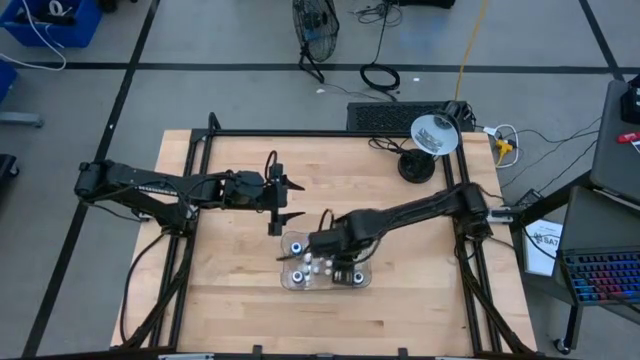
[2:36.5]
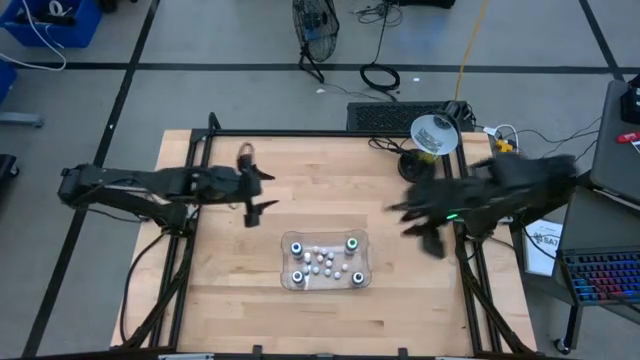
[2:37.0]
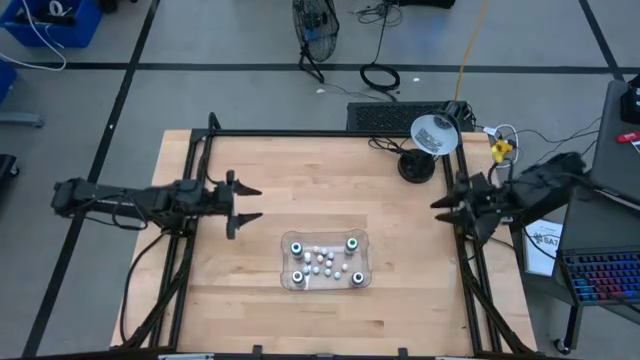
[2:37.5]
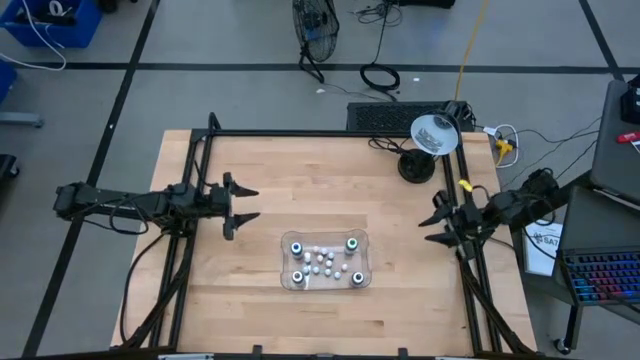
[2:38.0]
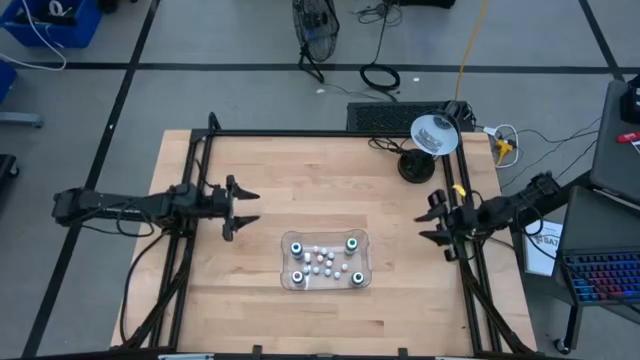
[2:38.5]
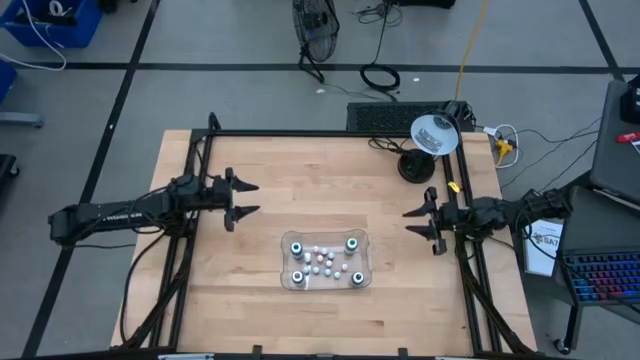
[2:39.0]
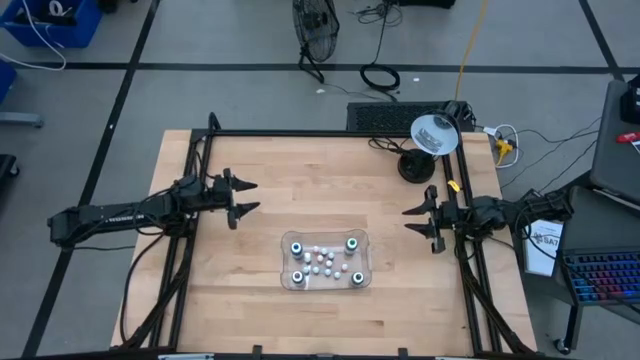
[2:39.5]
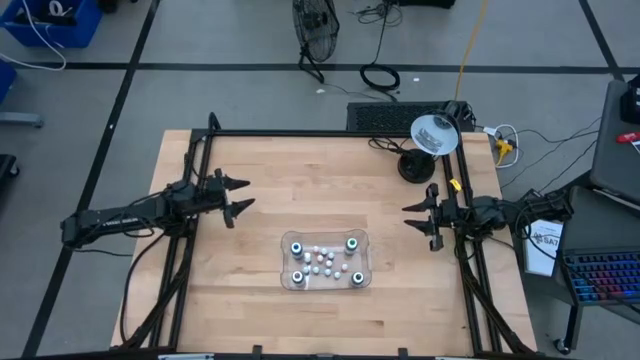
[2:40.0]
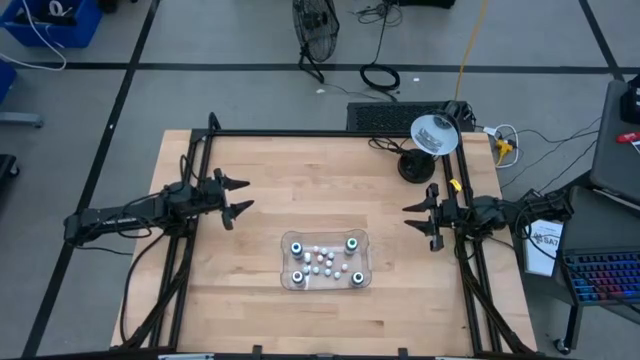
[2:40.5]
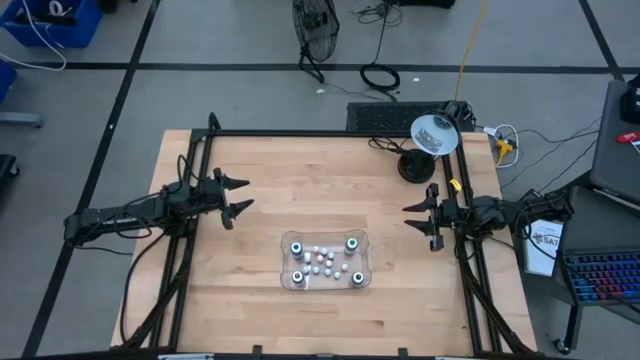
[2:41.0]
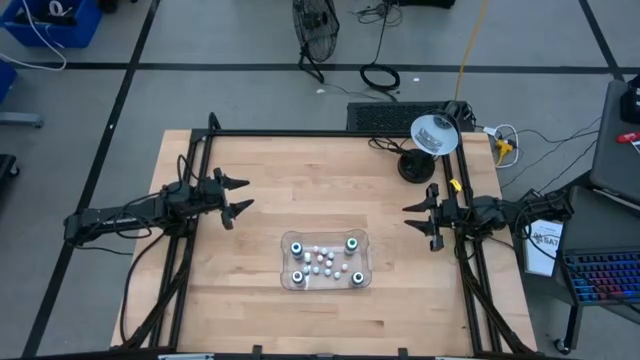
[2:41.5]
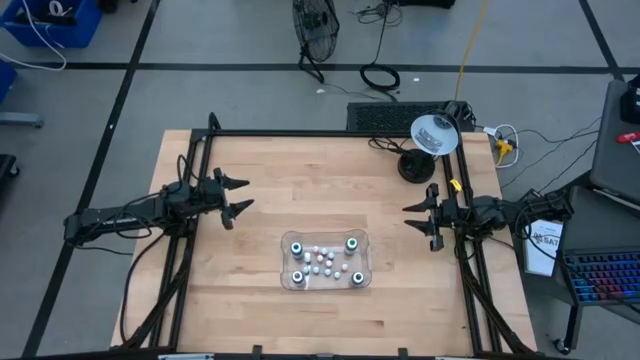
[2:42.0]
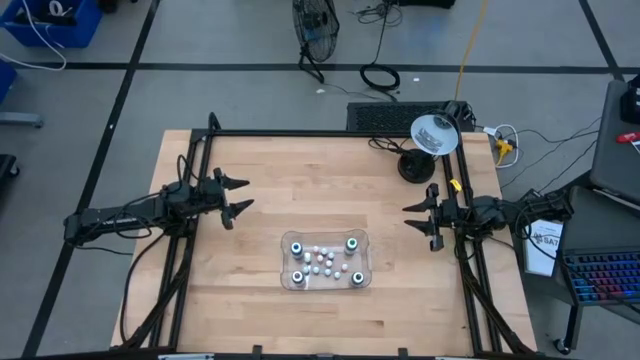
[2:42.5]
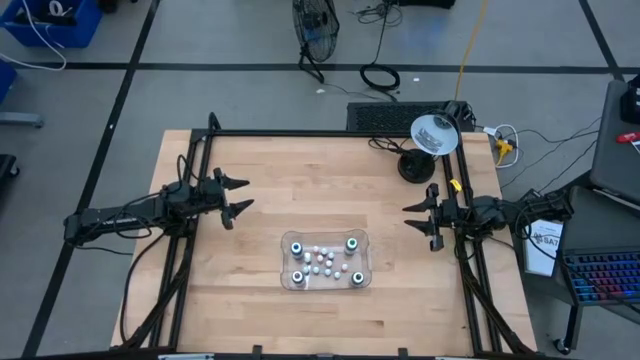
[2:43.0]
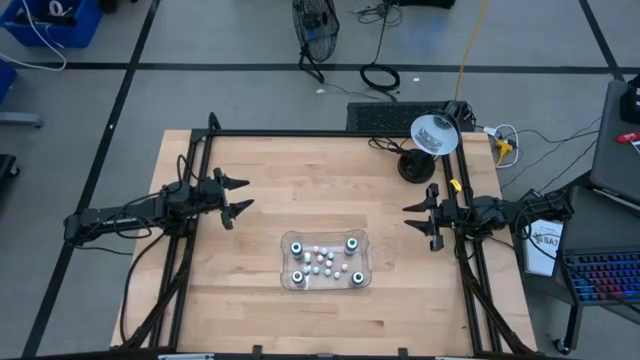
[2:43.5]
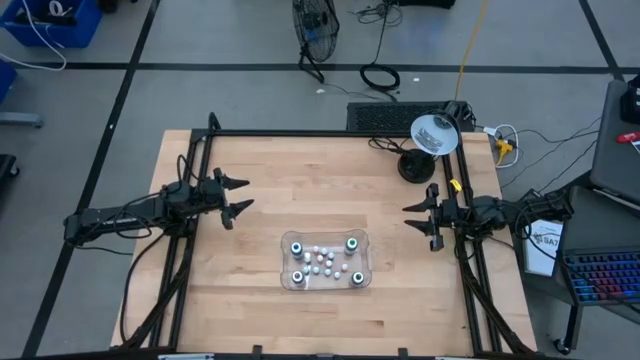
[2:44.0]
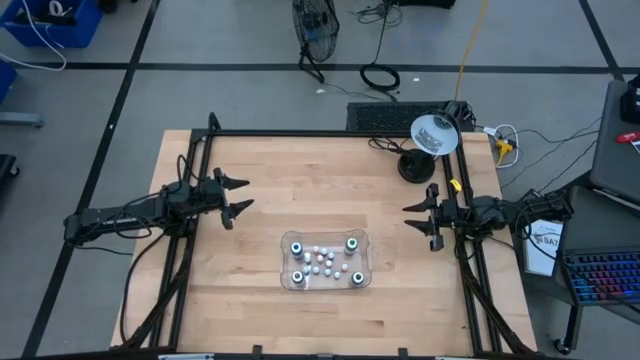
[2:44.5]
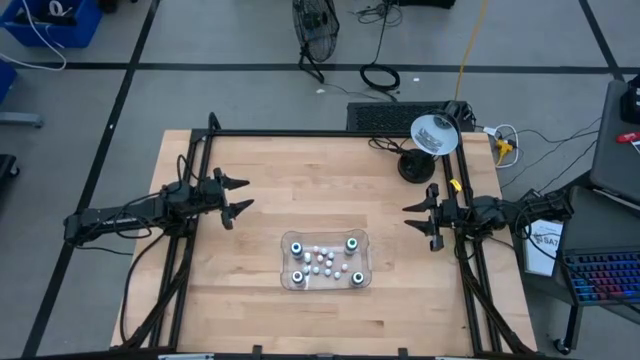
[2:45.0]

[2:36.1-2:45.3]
Task: Pick & Place food coloring
Return to home position

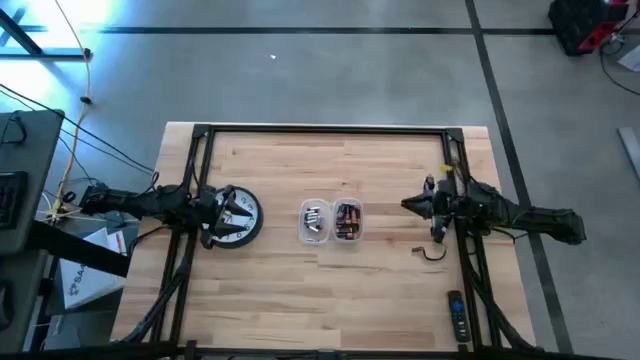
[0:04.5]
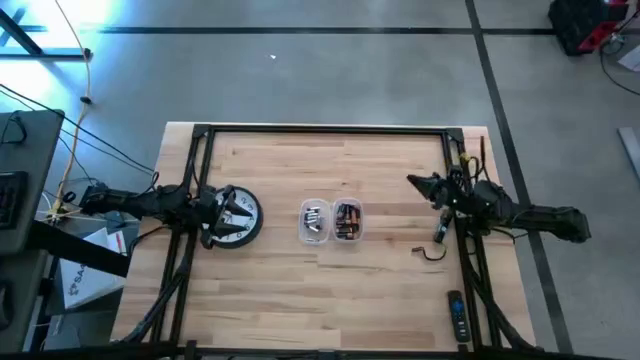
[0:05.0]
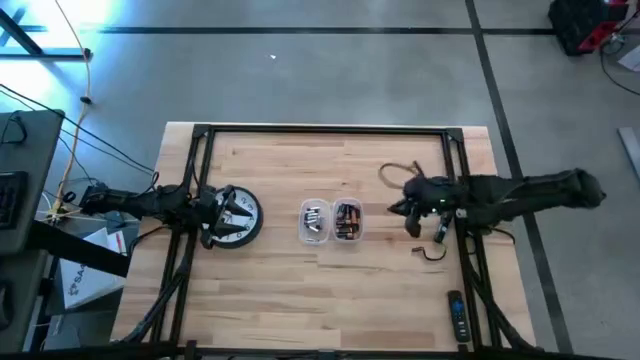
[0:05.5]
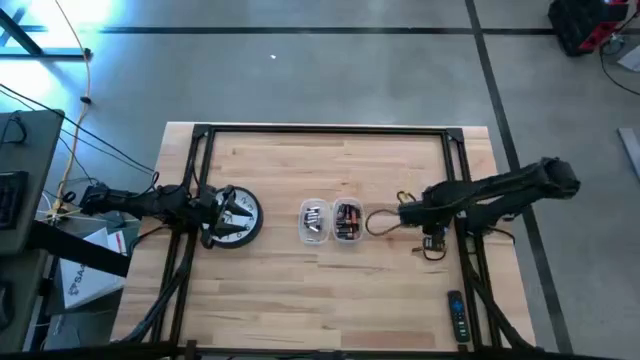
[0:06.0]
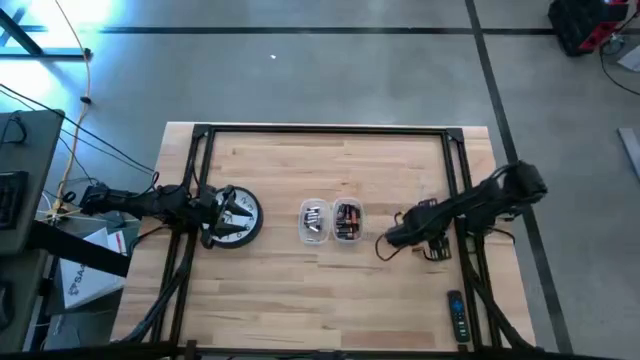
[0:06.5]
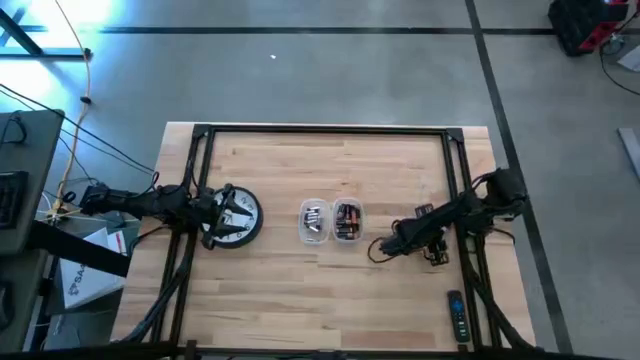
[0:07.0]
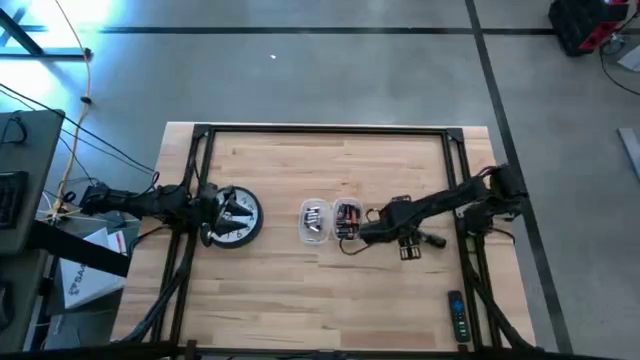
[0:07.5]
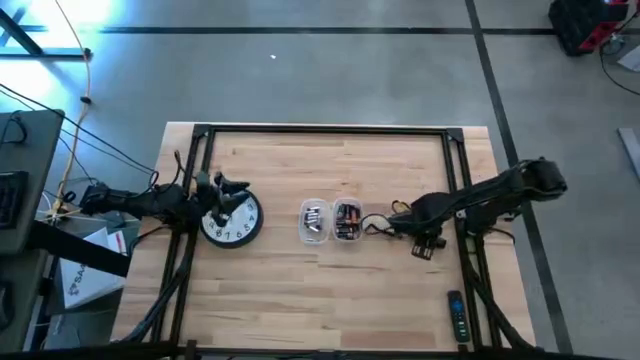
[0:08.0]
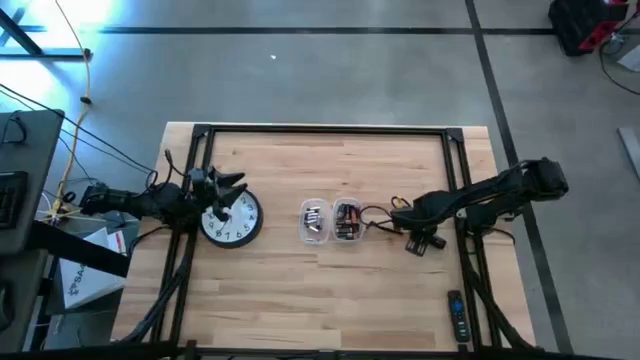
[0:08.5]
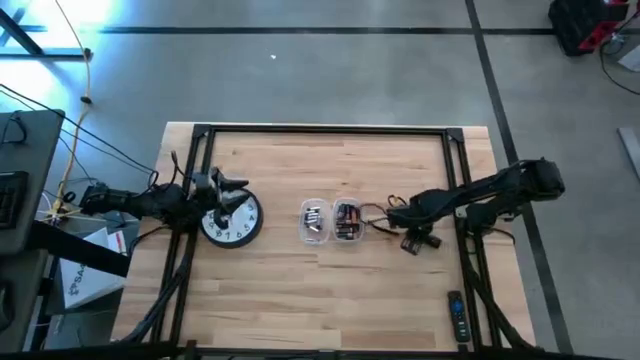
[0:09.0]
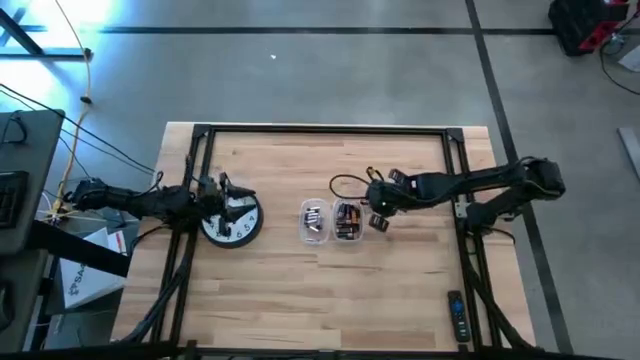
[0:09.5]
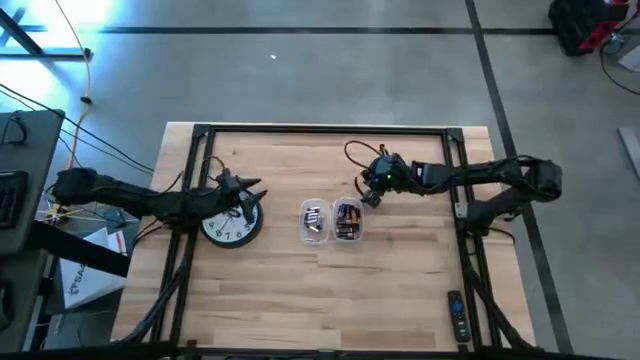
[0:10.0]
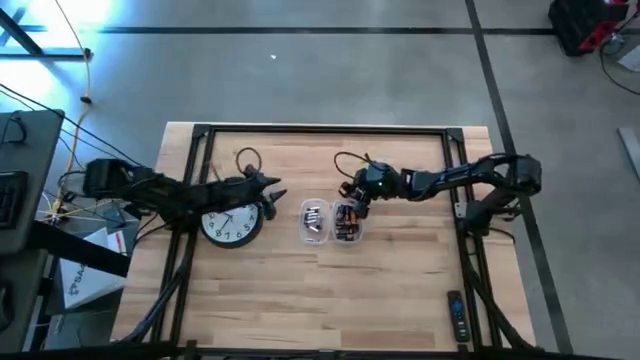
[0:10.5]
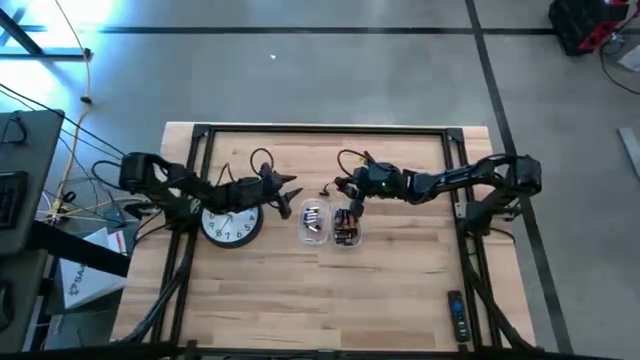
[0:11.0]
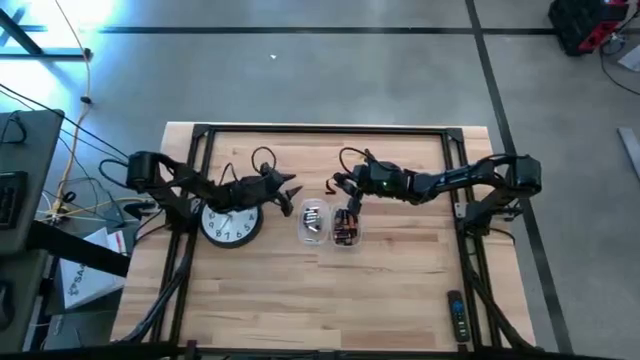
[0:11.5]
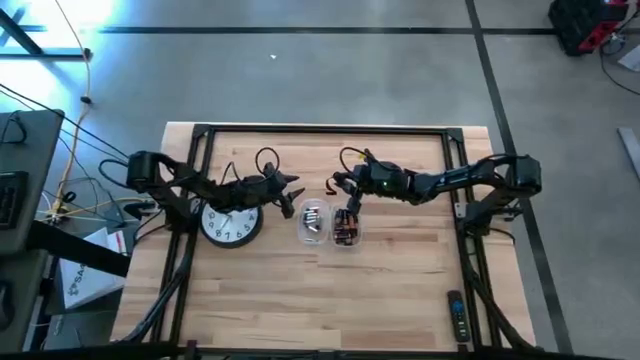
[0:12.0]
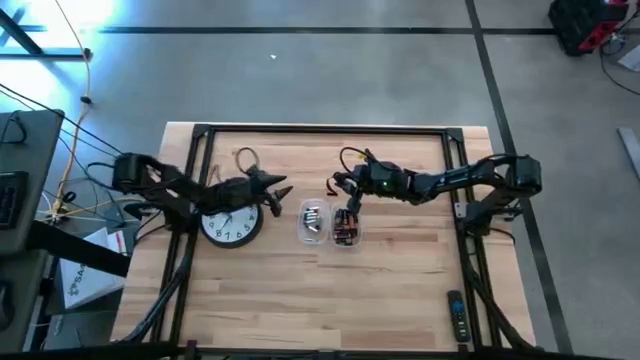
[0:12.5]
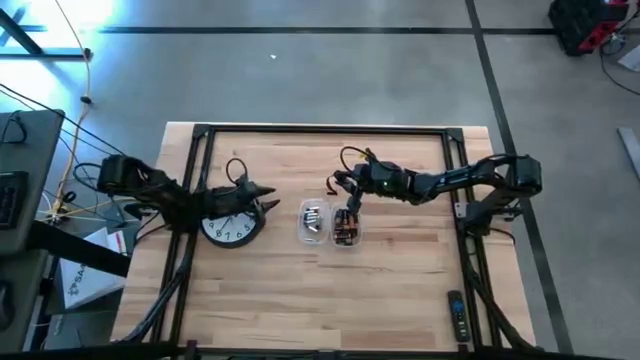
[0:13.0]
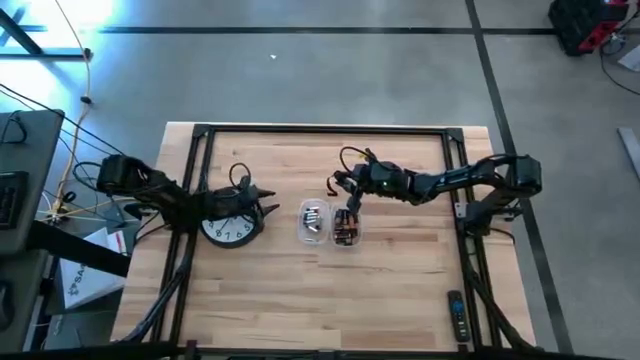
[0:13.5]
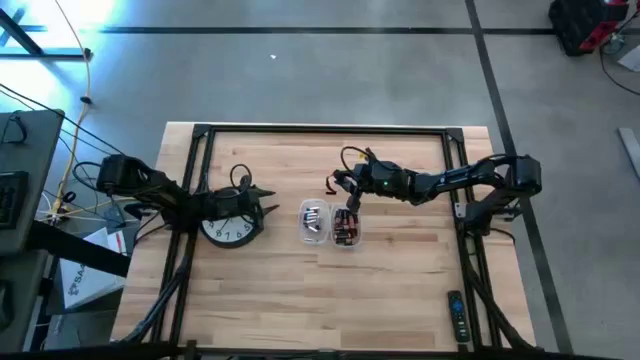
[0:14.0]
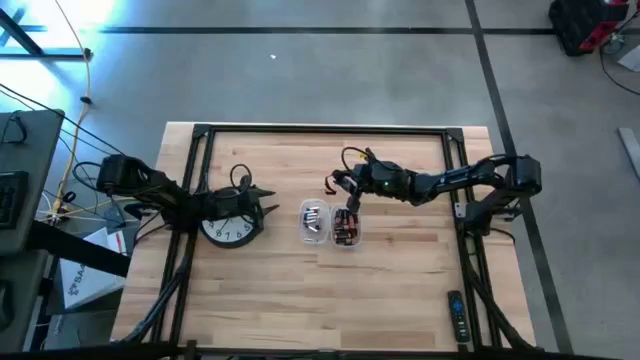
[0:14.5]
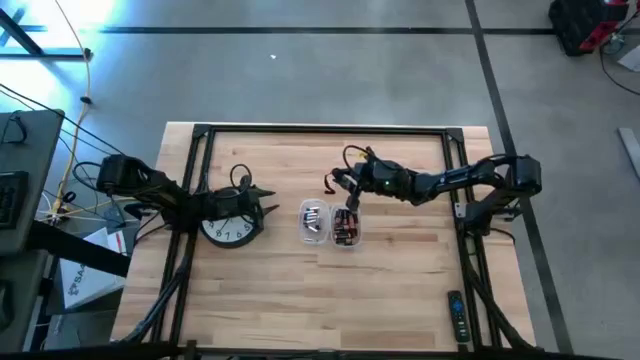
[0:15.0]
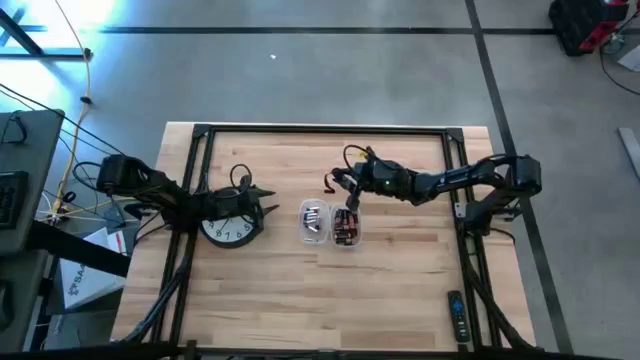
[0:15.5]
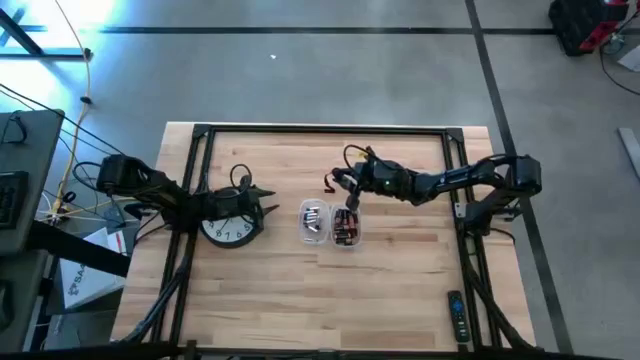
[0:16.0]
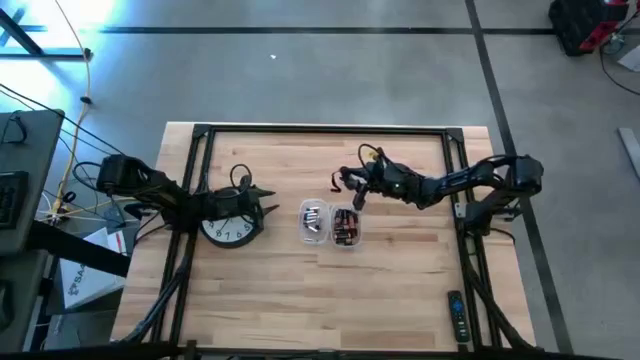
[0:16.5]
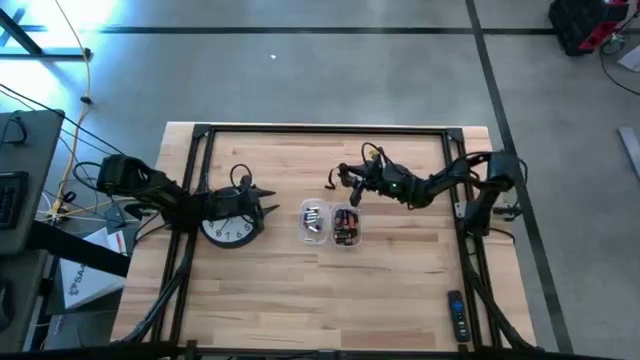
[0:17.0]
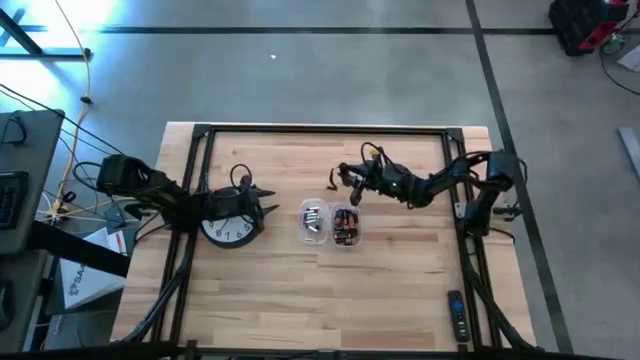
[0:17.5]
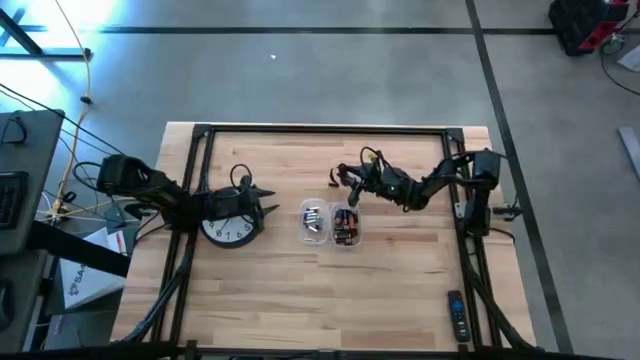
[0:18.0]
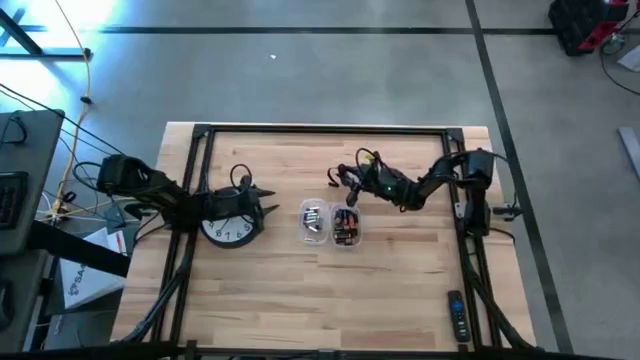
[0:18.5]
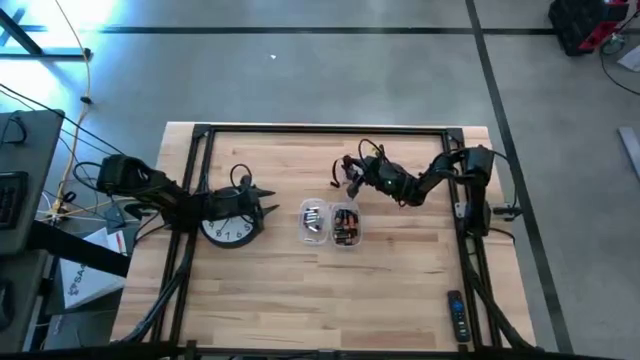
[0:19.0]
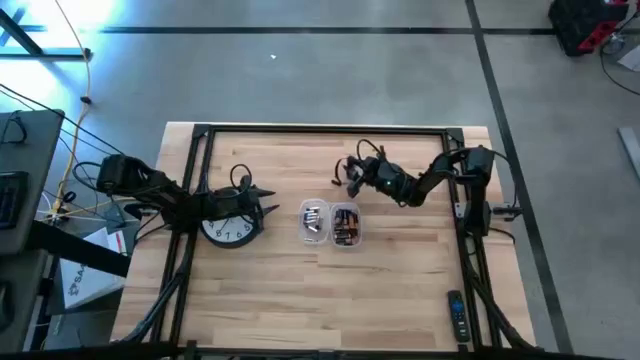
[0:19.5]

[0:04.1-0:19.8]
Task: Insert battery
Move the black flashlight to the top center of the table
